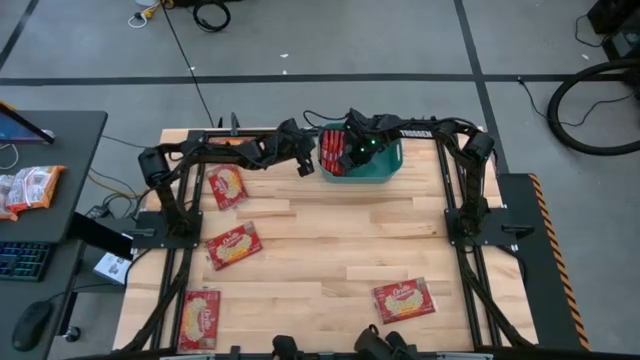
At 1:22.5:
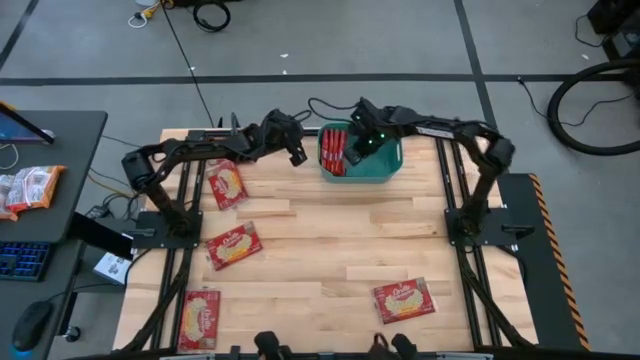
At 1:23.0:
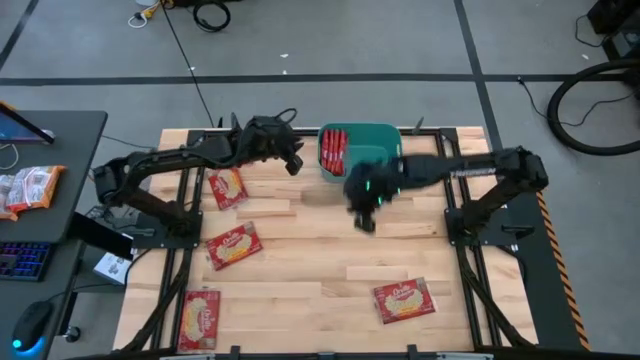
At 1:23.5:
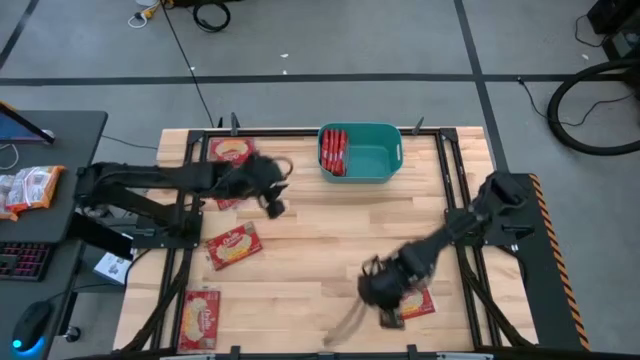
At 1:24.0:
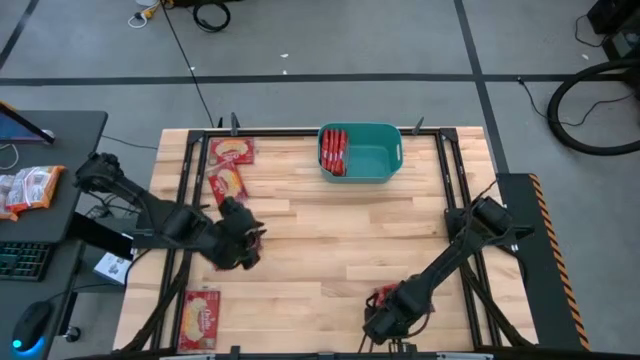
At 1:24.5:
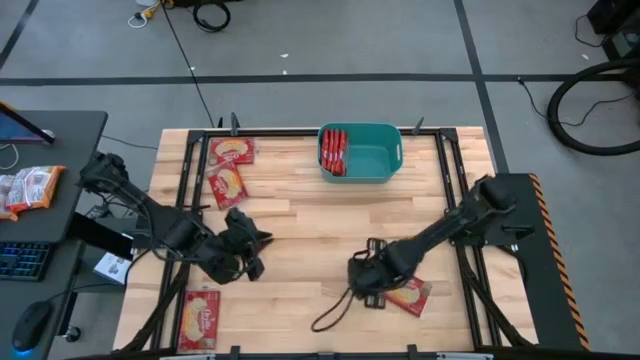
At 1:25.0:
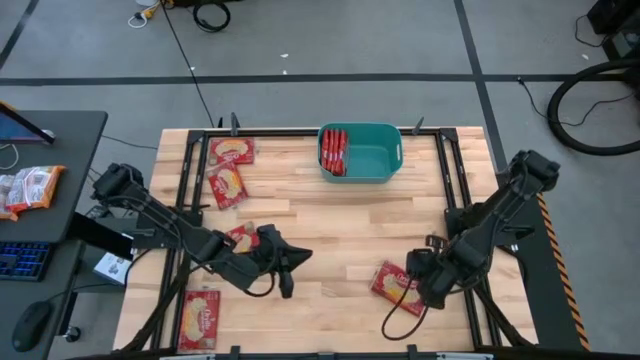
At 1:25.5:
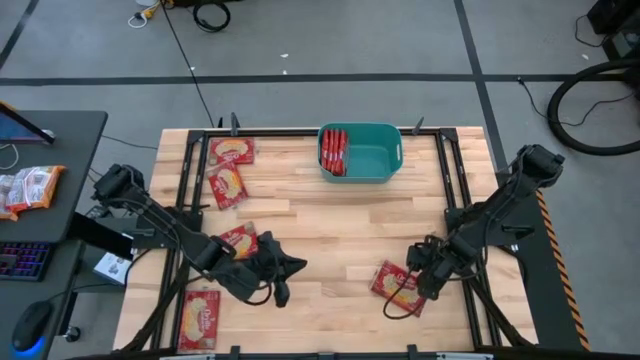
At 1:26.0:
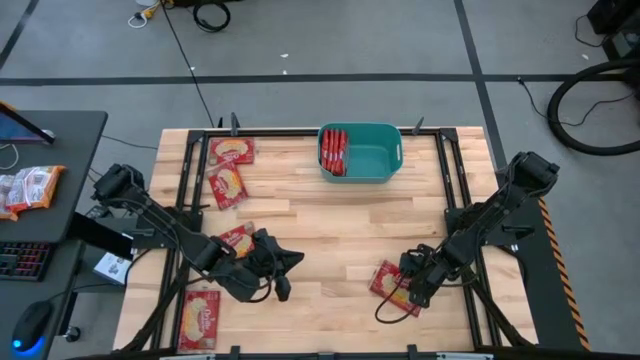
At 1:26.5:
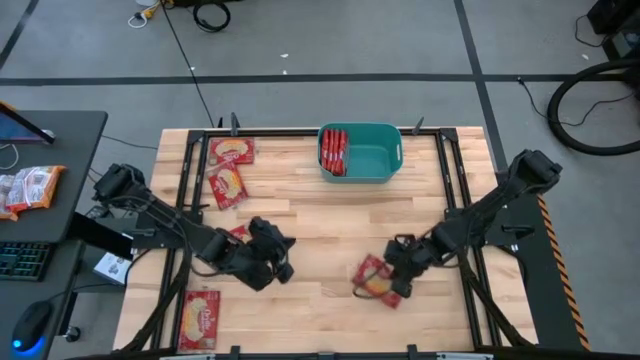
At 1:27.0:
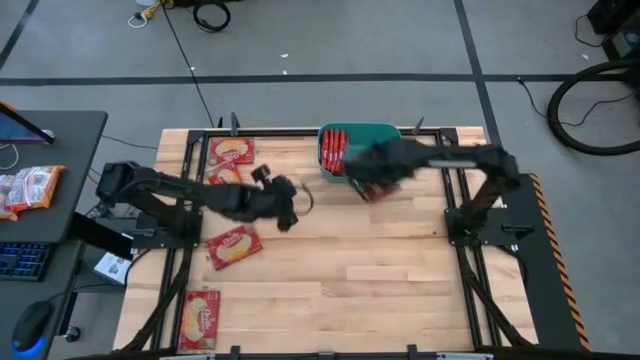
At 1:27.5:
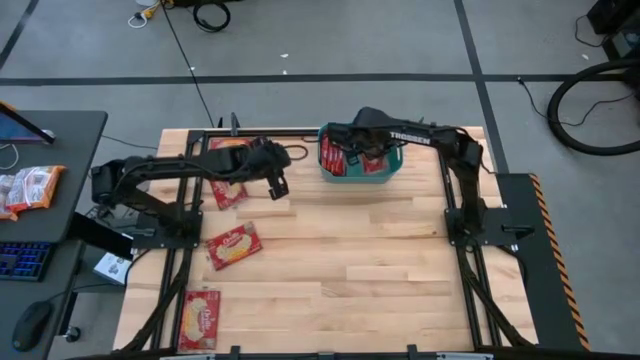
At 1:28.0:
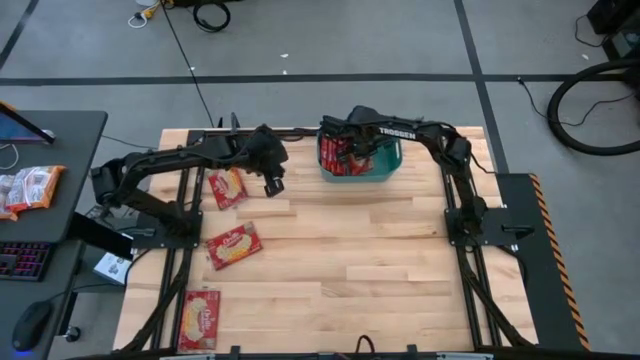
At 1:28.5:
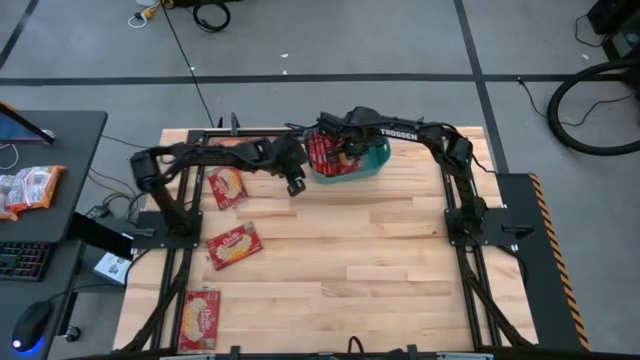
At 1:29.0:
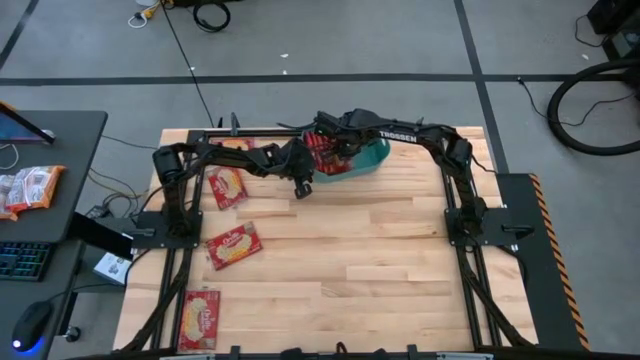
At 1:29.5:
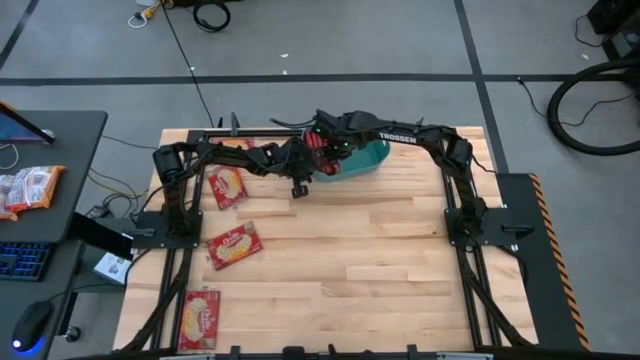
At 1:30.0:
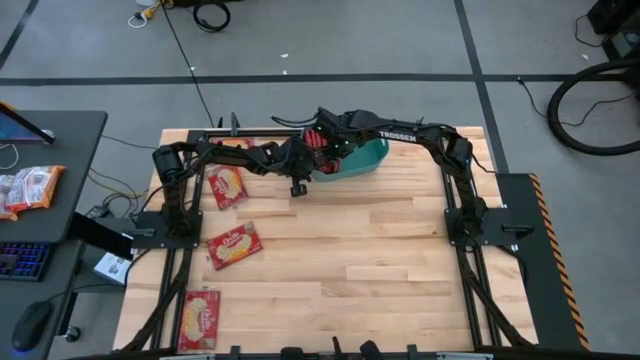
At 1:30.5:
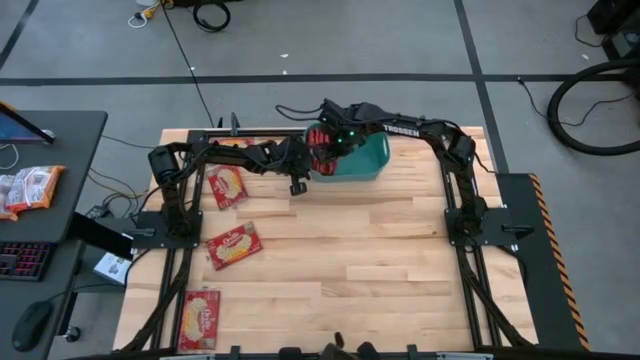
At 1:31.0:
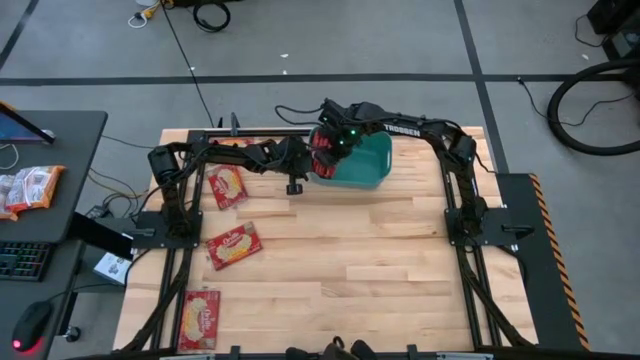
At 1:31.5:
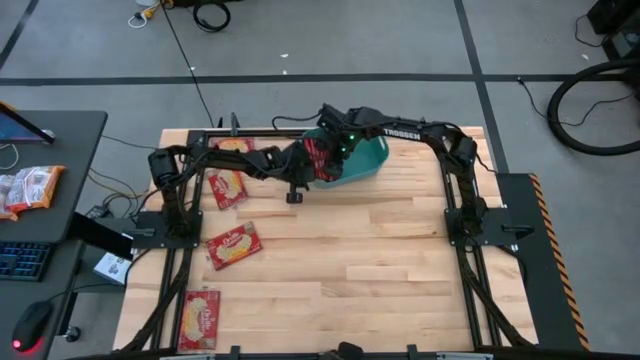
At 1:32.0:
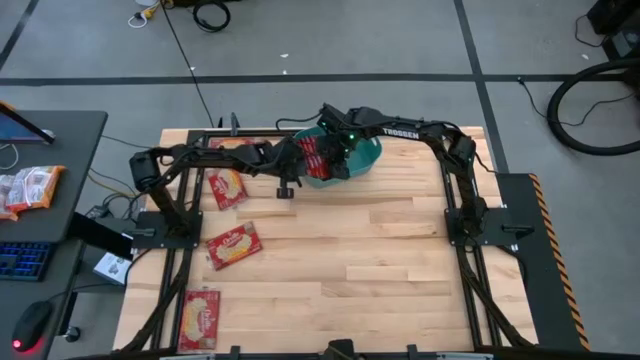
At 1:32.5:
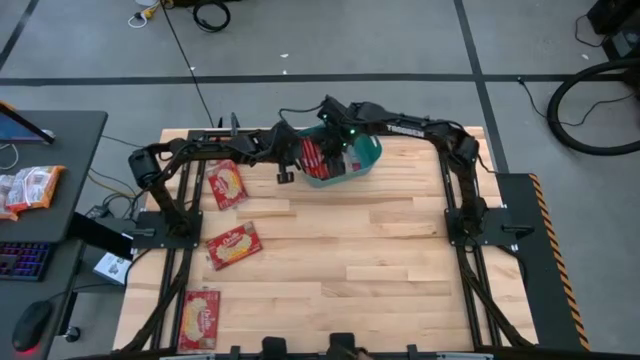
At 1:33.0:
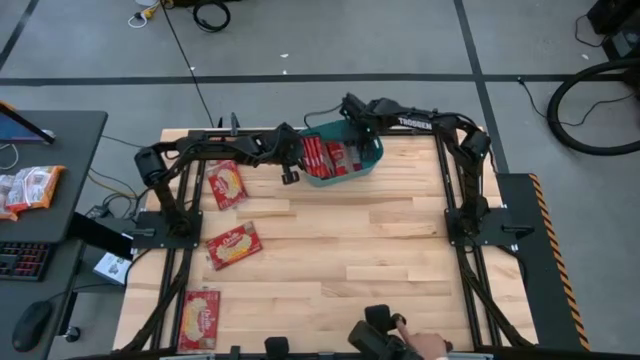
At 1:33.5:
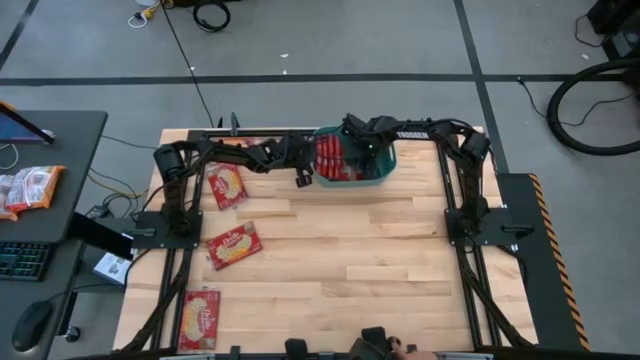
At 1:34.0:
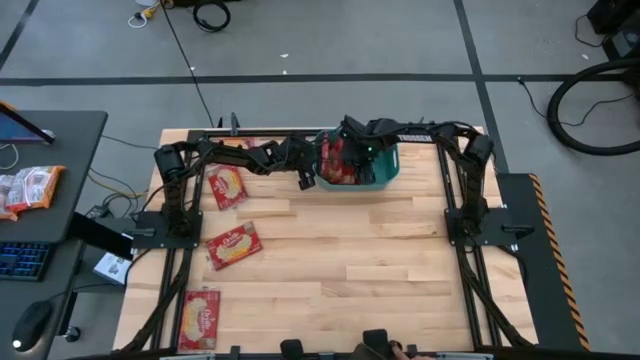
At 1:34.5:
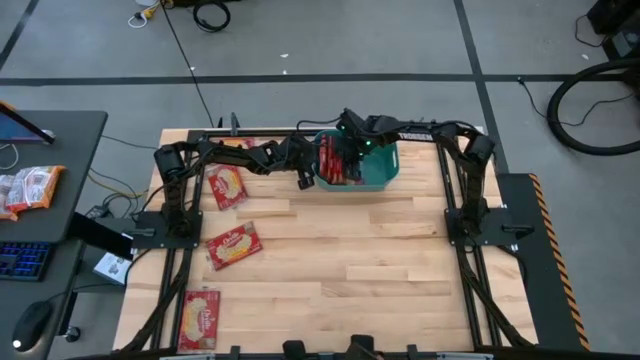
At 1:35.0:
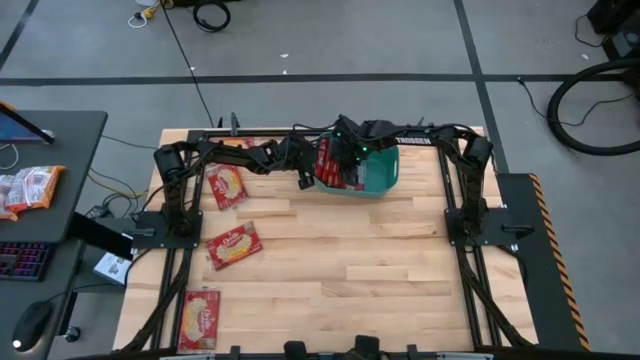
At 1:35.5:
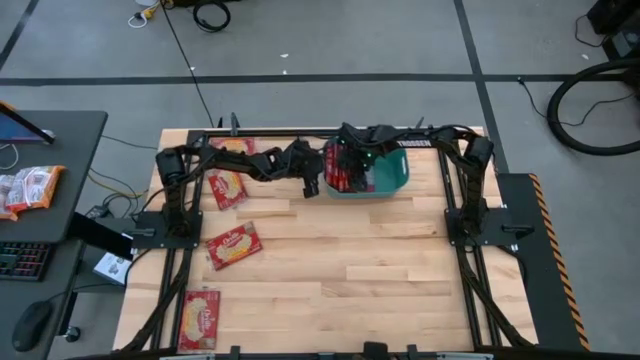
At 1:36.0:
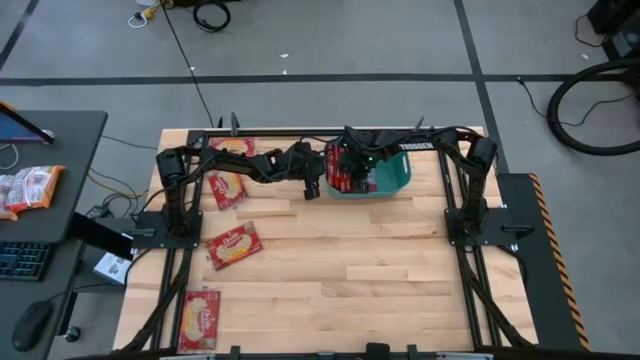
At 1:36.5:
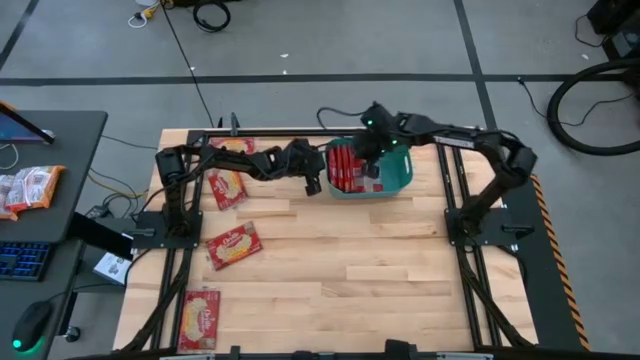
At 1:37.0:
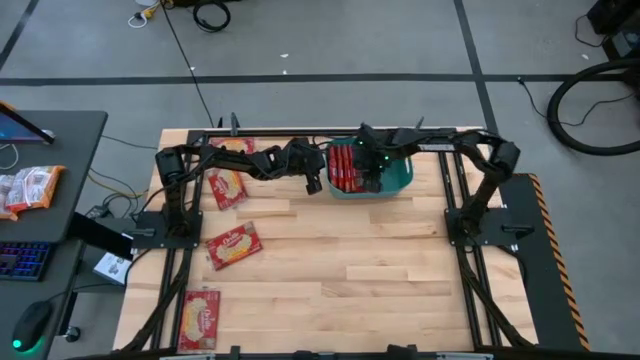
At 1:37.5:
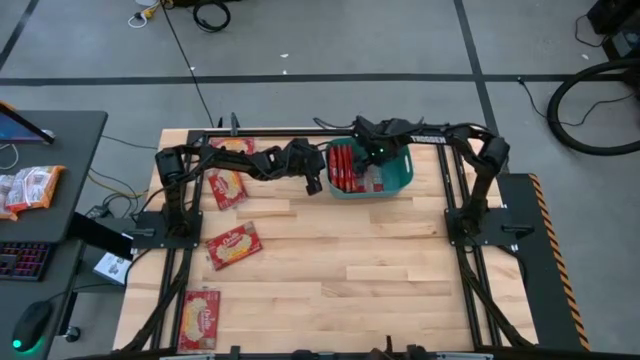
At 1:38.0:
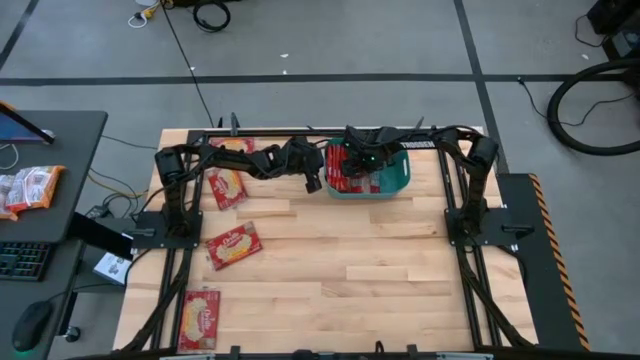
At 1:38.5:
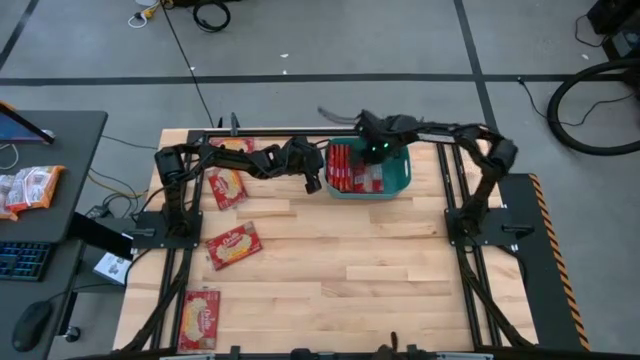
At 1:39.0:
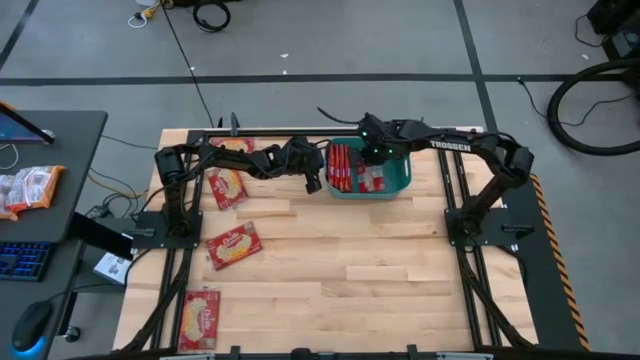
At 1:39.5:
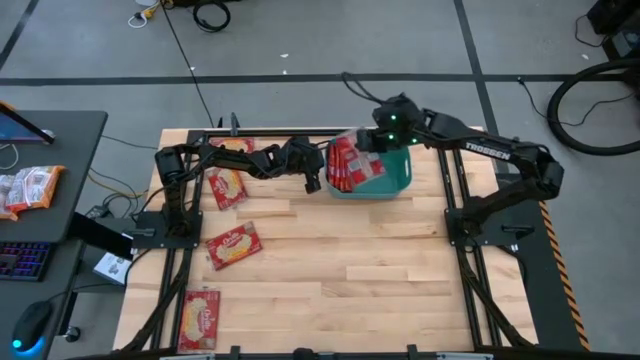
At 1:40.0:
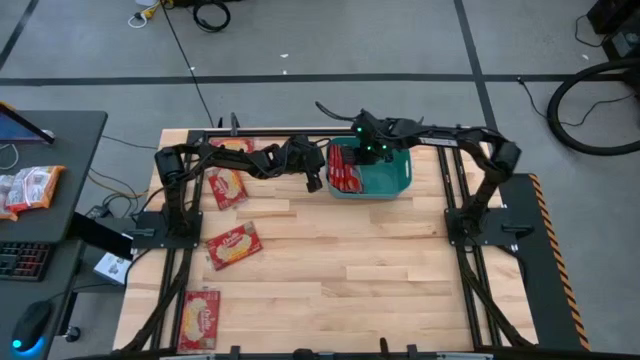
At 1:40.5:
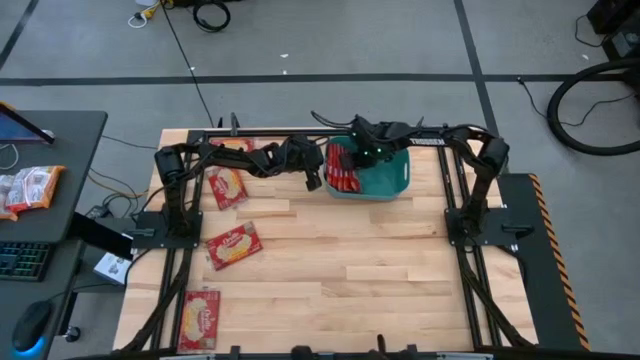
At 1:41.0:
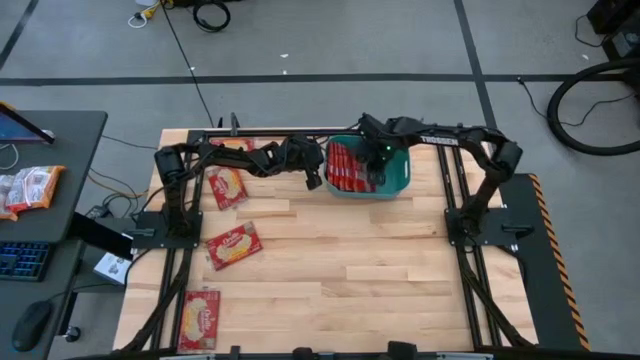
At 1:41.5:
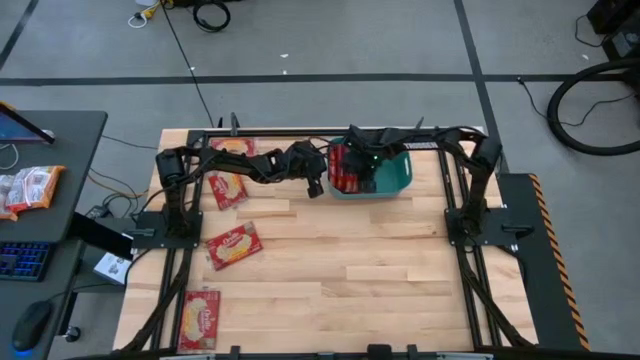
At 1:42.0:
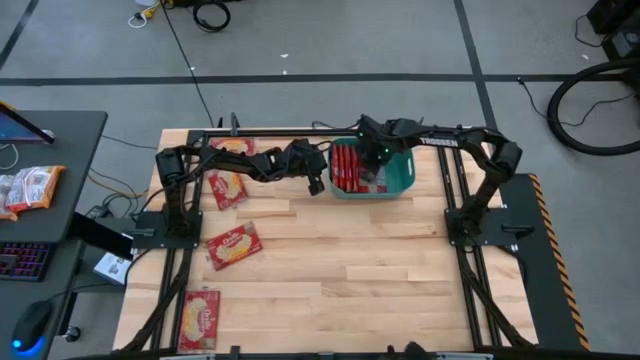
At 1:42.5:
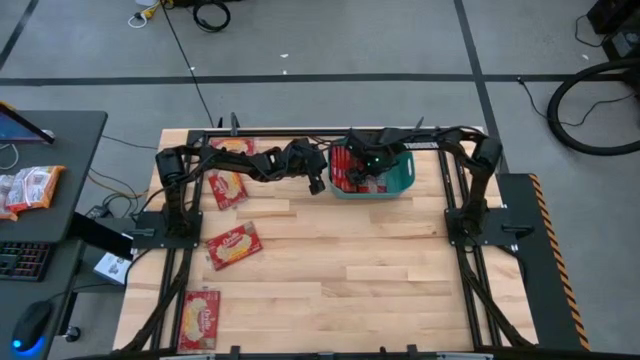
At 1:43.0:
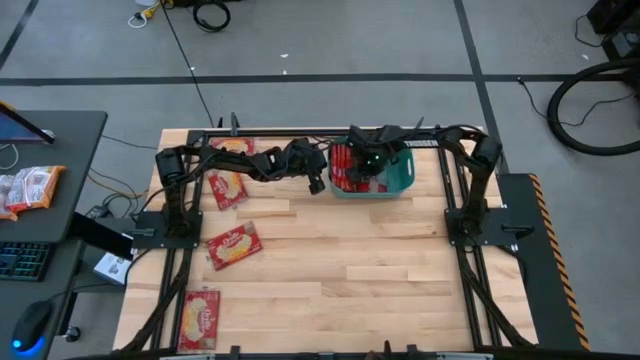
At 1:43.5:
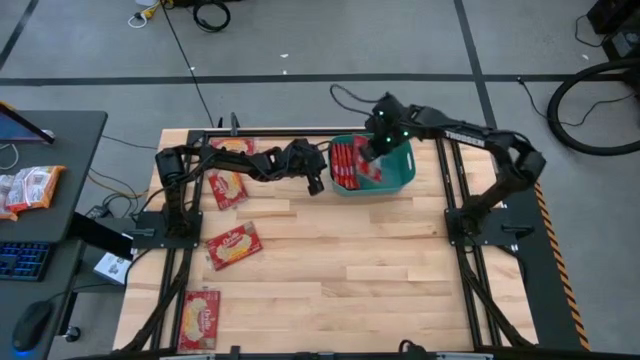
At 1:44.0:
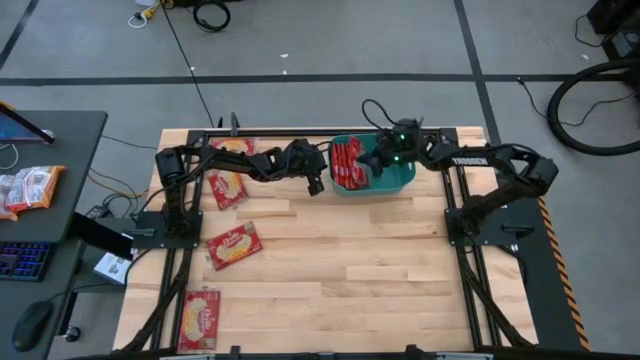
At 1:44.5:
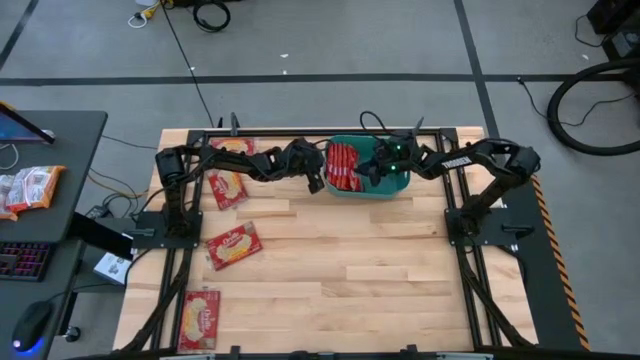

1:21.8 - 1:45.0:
Task: Sort popcorn bags into baskets
Put the popcorn bag into the bin
